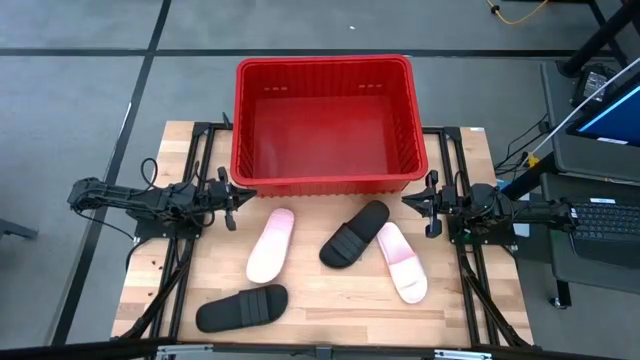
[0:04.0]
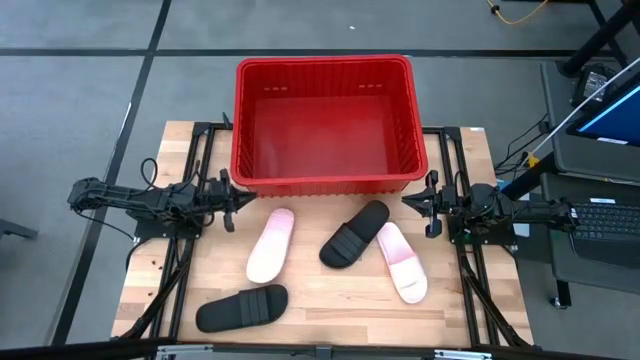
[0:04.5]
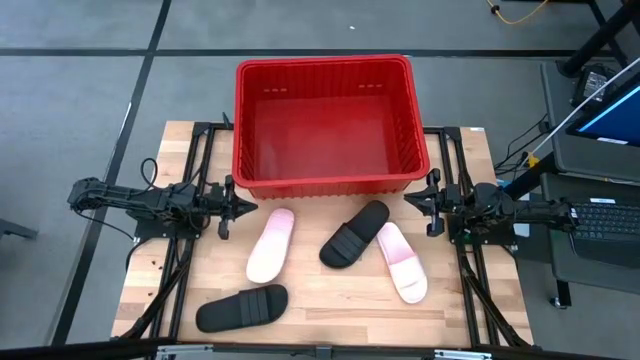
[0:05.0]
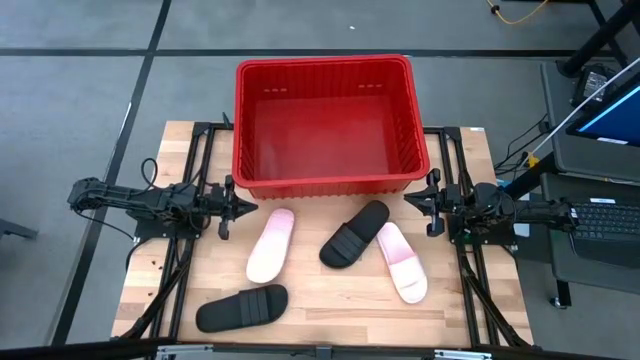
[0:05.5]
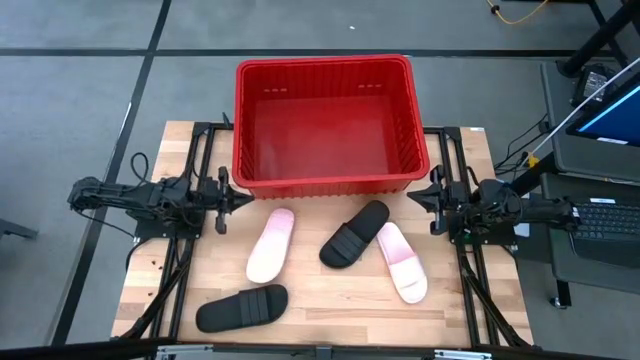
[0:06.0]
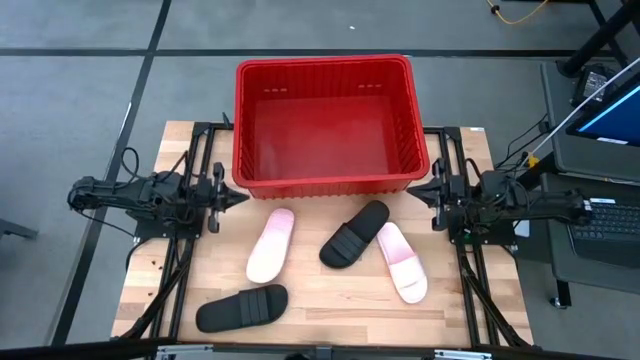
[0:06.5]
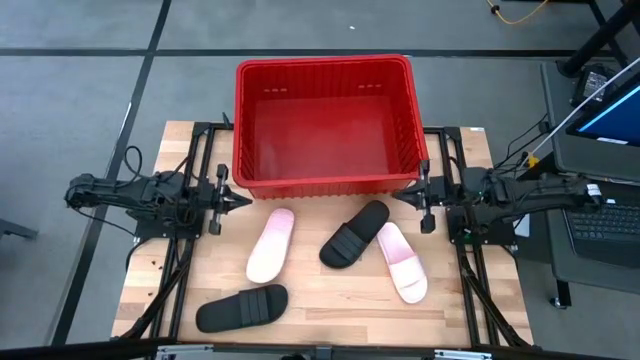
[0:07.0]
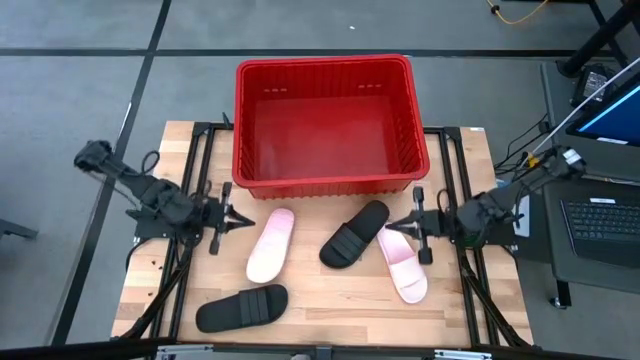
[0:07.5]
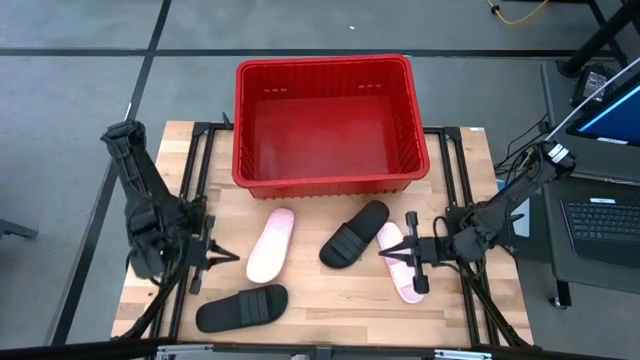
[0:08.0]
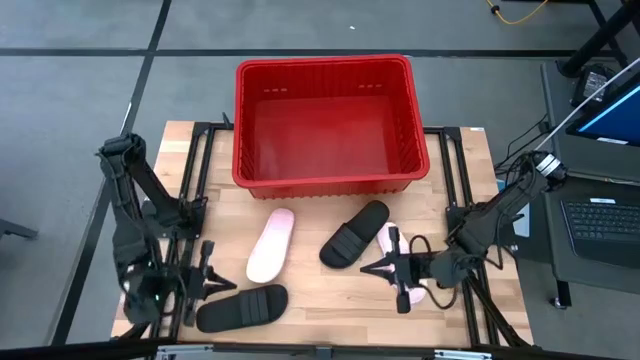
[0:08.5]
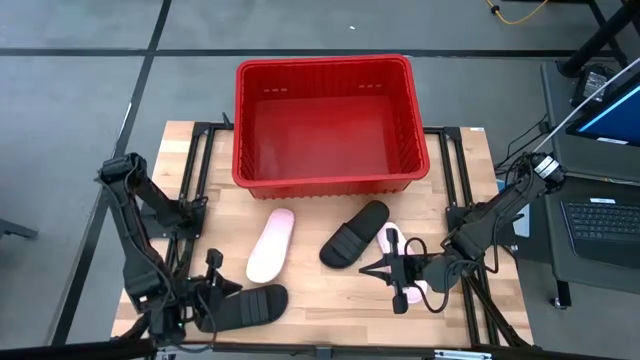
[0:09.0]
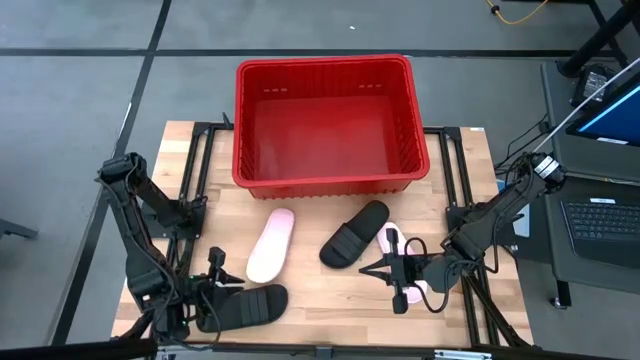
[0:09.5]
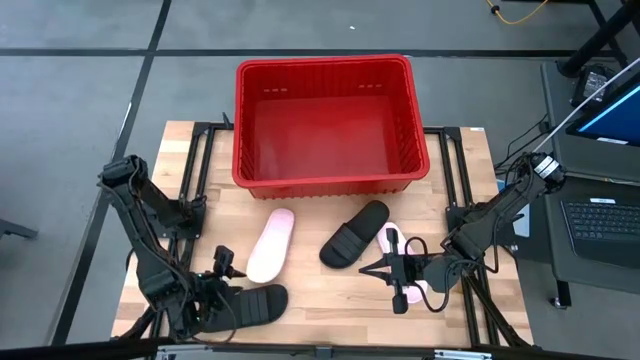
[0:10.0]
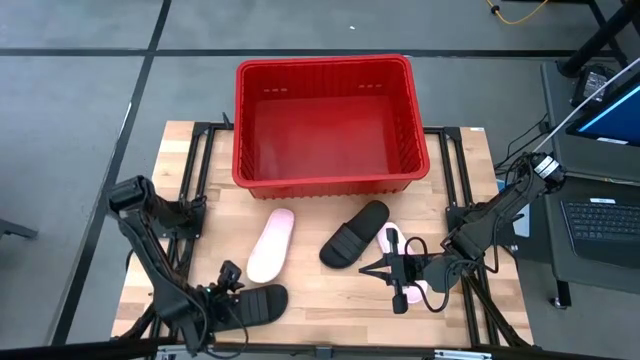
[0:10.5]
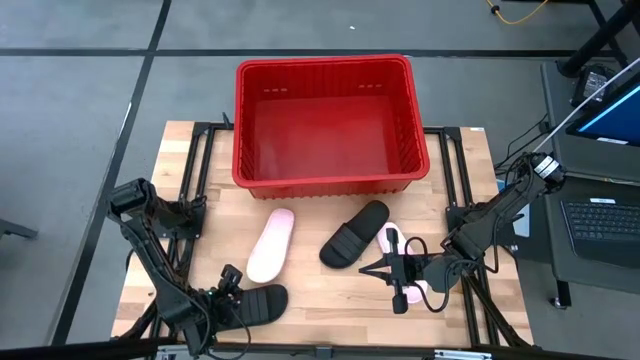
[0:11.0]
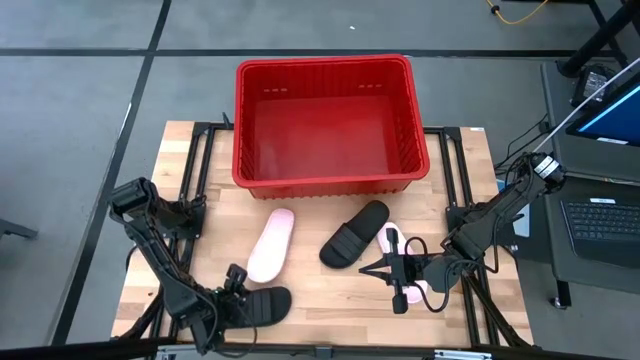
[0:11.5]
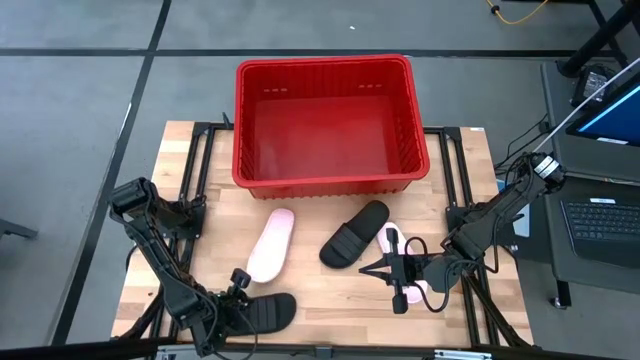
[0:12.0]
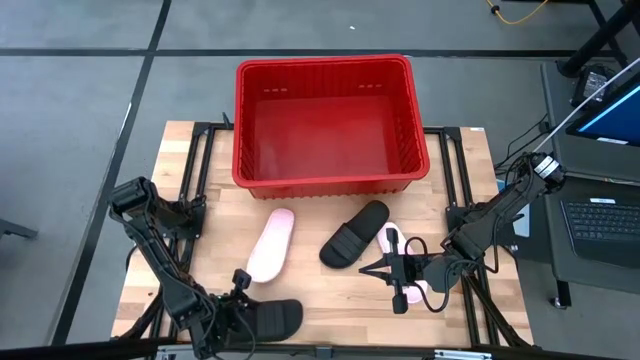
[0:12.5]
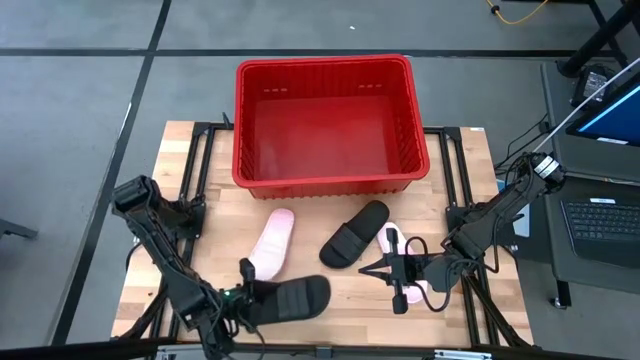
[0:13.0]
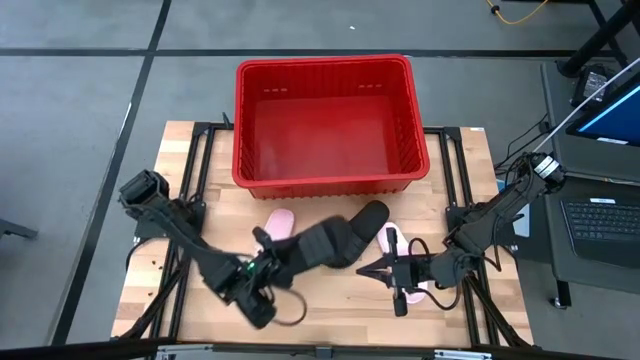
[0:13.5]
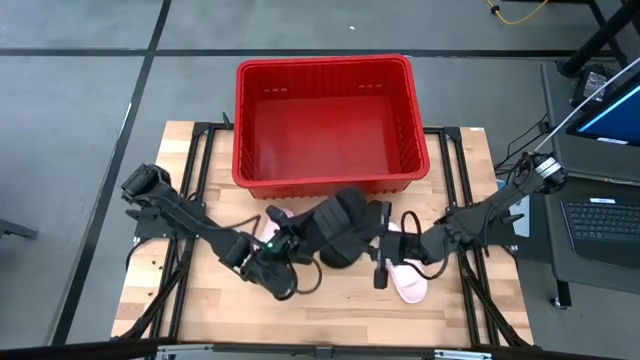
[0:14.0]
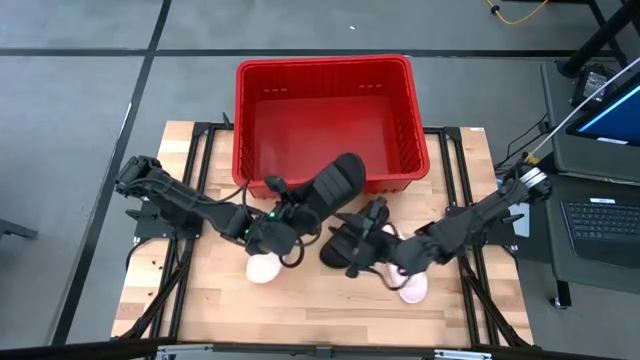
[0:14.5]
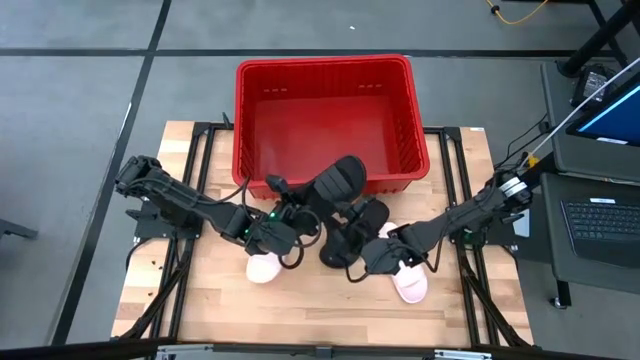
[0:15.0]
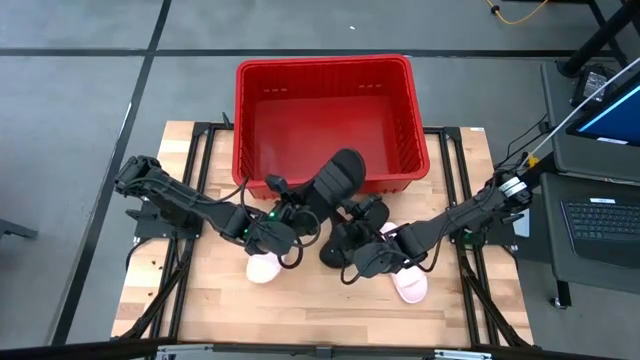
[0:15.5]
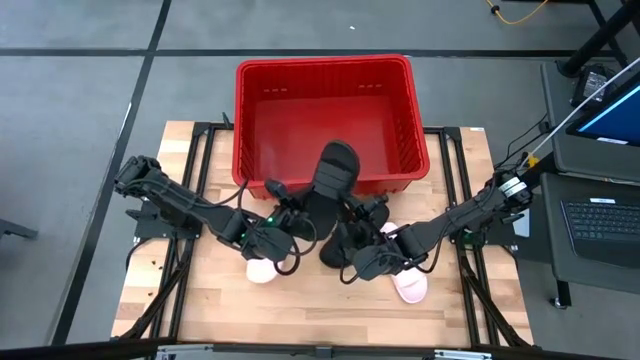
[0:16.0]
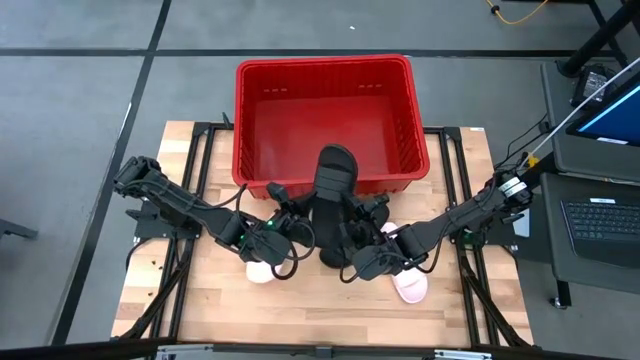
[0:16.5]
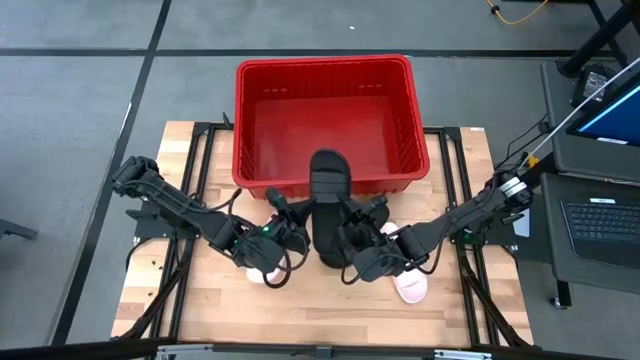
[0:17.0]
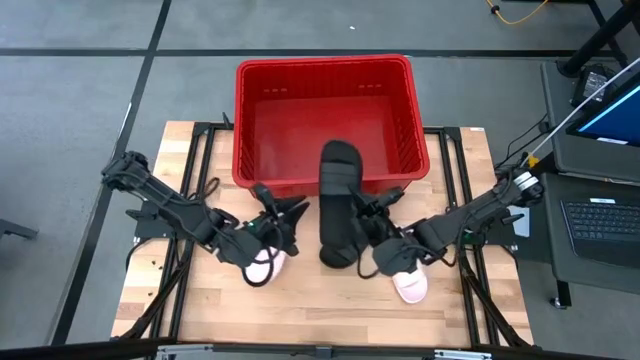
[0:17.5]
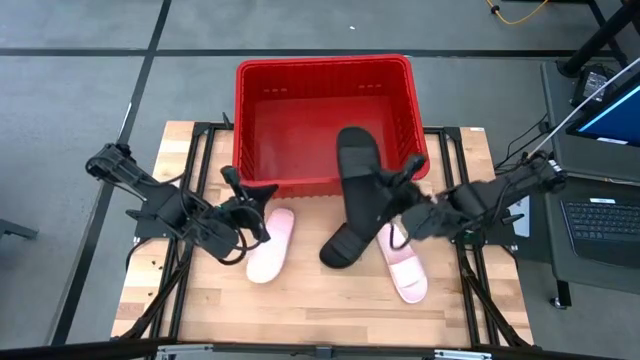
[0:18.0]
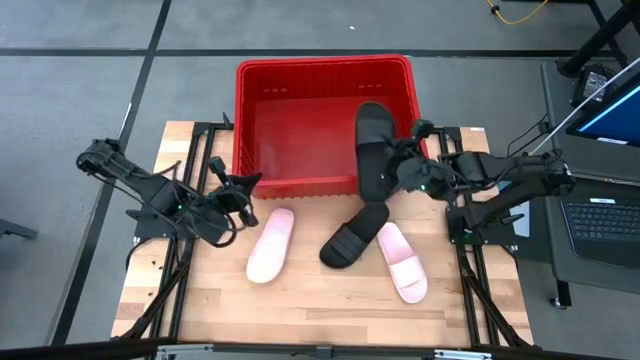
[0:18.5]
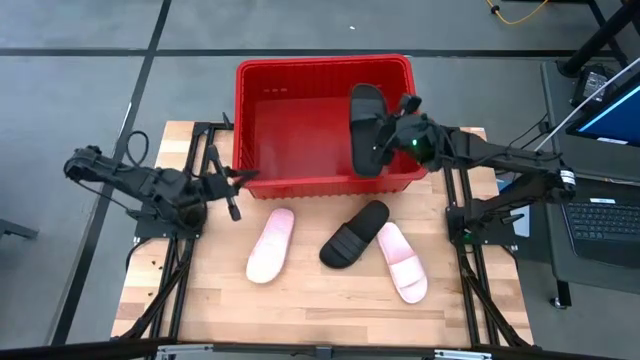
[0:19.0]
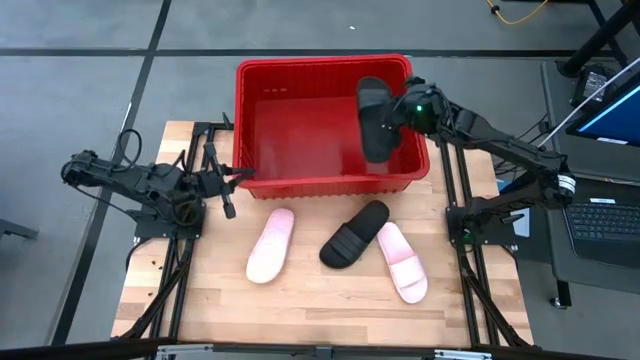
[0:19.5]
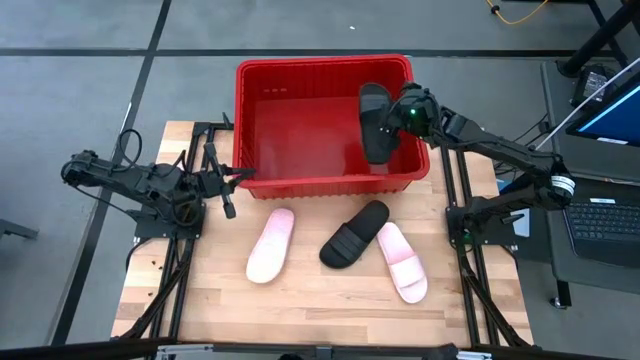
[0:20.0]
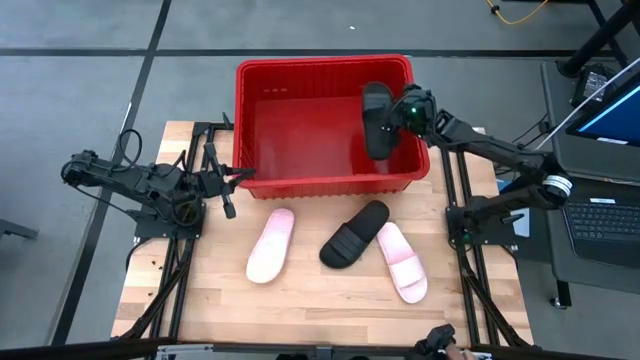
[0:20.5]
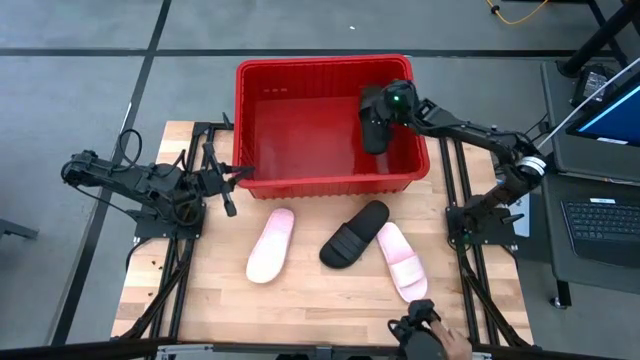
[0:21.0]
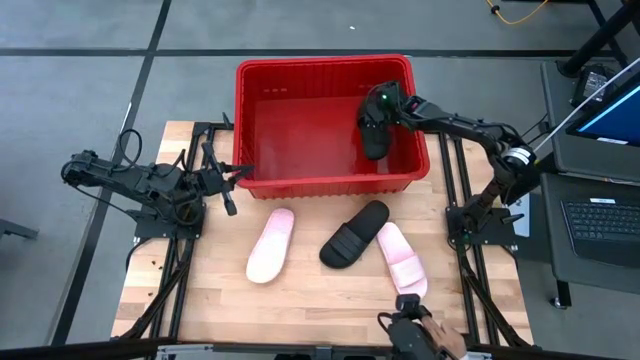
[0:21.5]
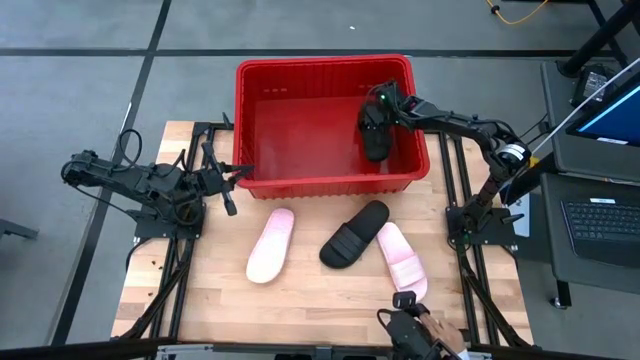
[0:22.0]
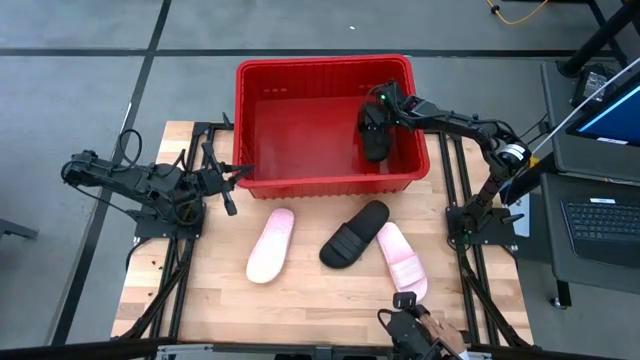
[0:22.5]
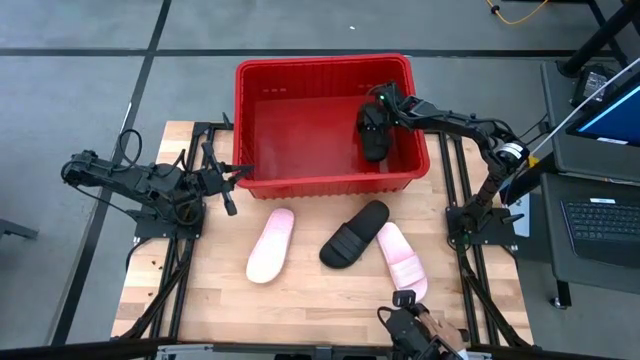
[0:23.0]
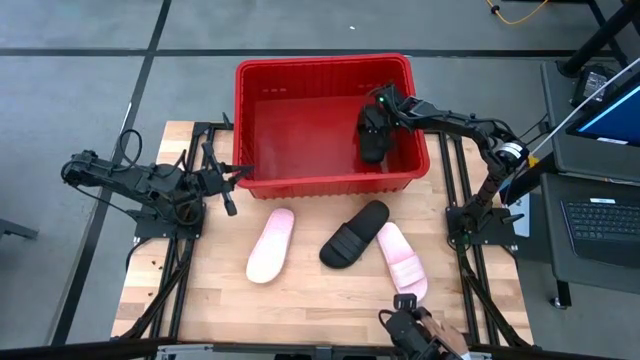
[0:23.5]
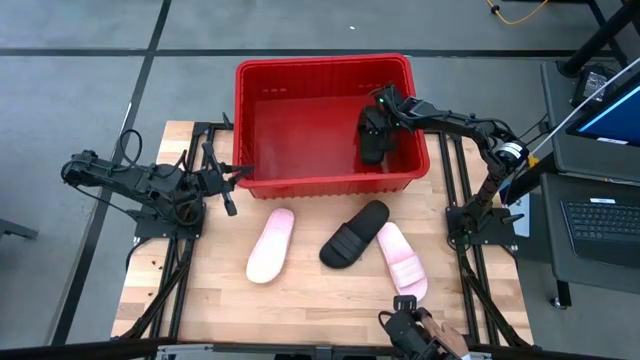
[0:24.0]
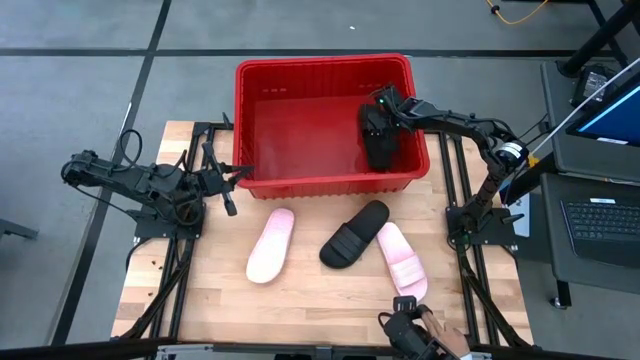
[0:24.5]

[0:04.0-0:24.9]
Task: Pick and place slides into bin
Put the bottom black slide into the bin
